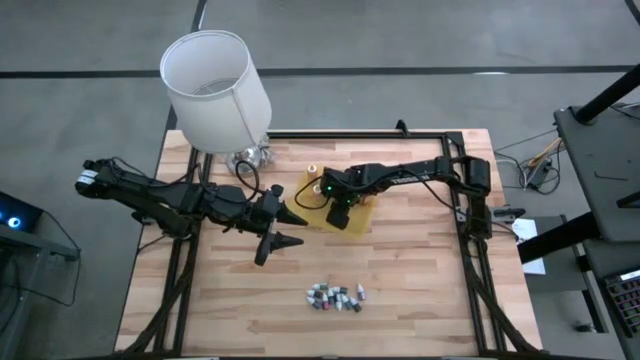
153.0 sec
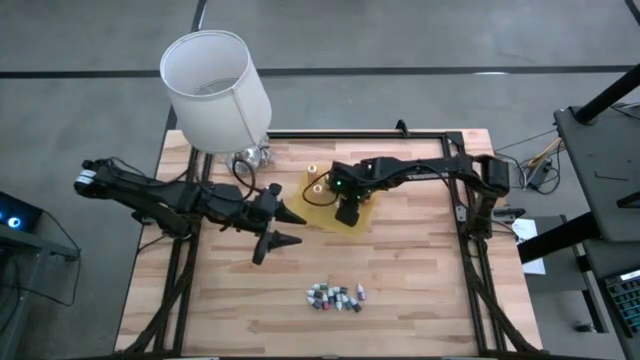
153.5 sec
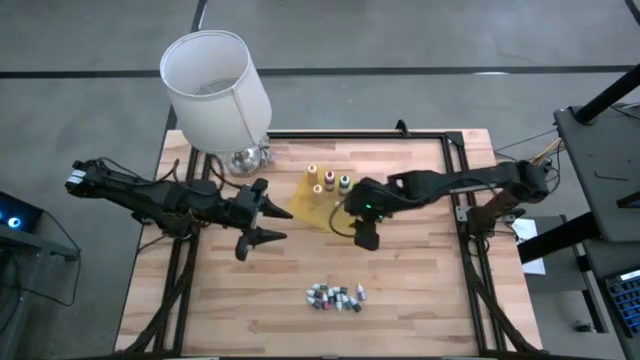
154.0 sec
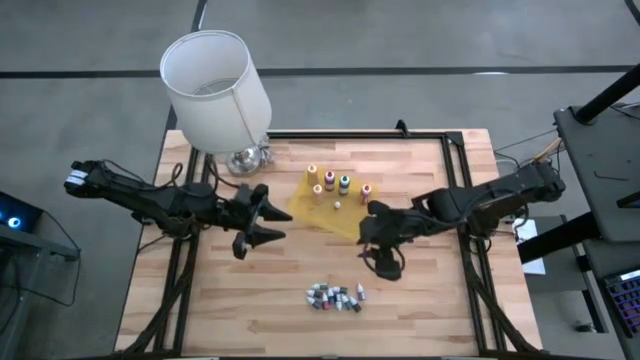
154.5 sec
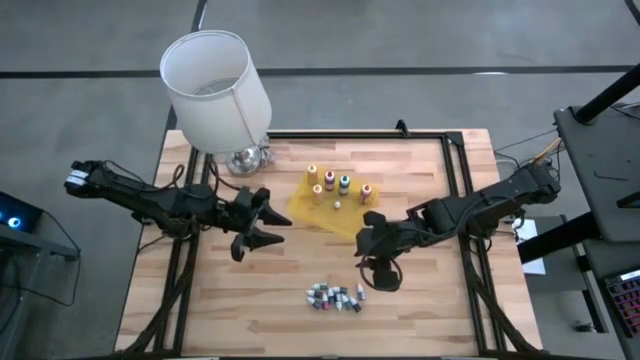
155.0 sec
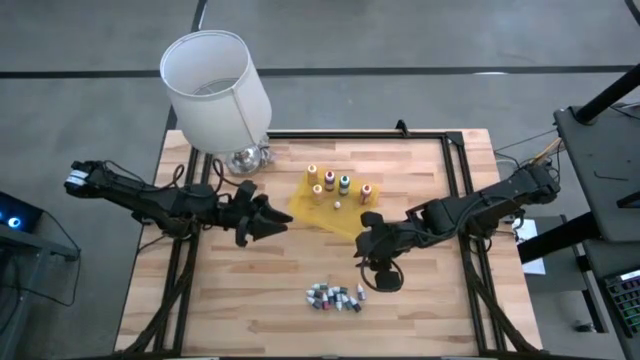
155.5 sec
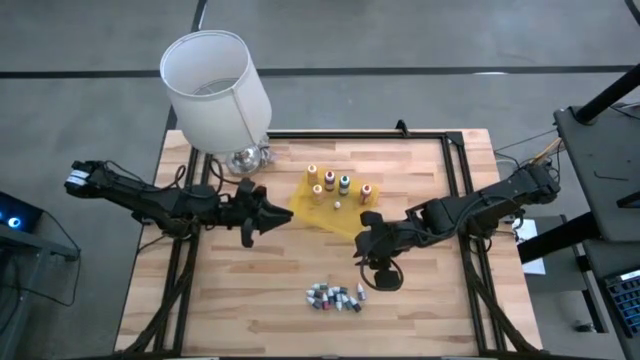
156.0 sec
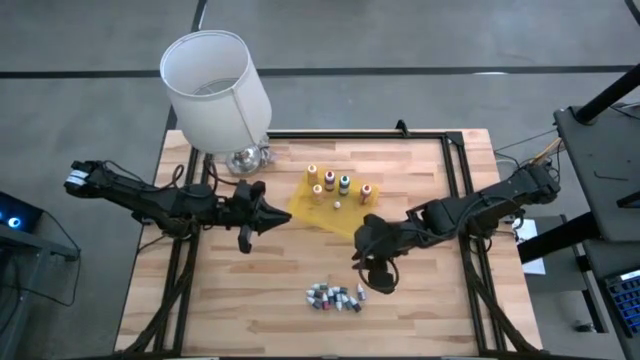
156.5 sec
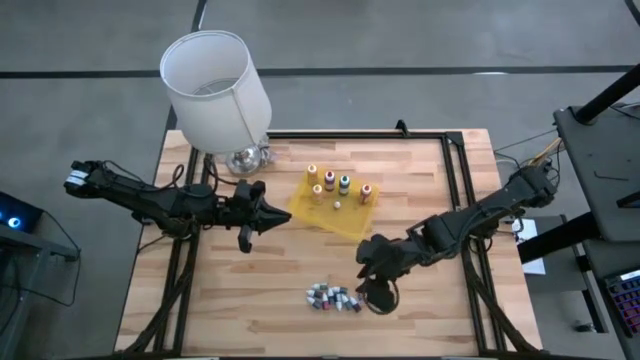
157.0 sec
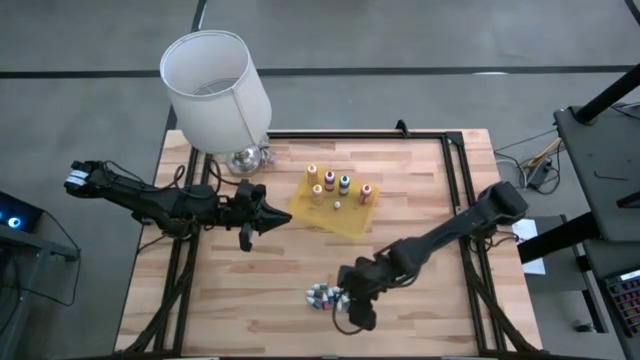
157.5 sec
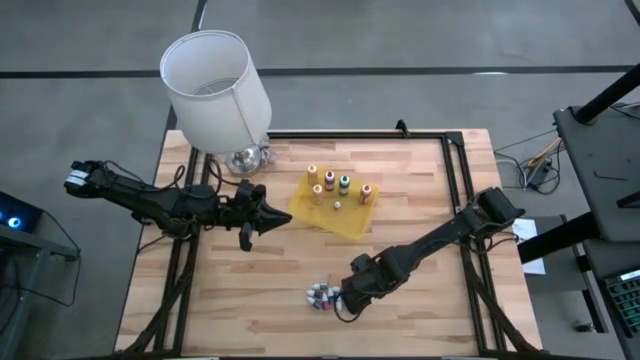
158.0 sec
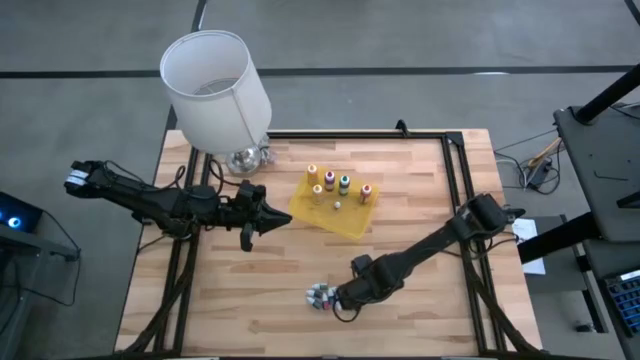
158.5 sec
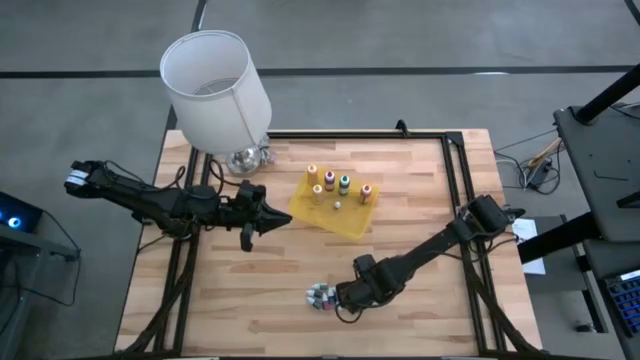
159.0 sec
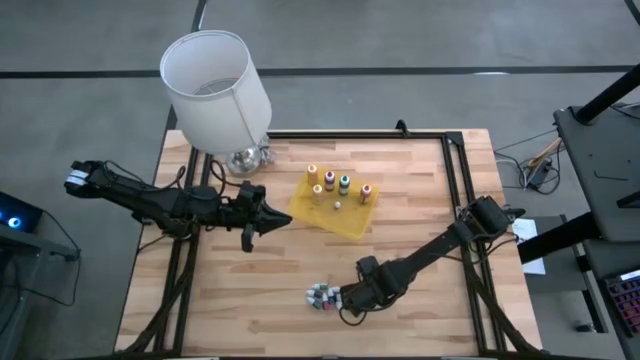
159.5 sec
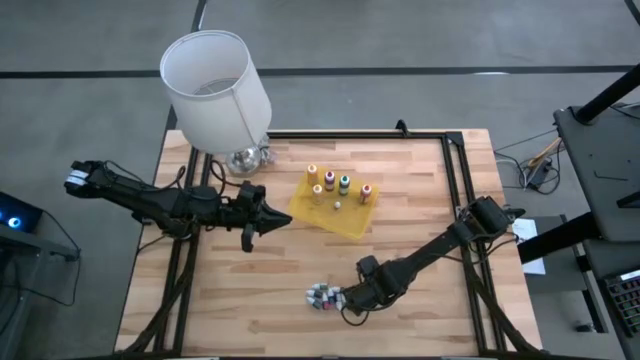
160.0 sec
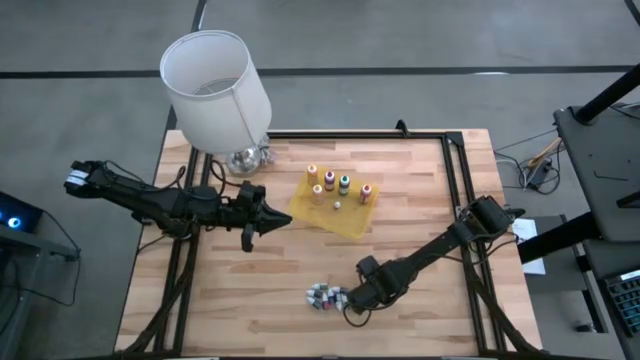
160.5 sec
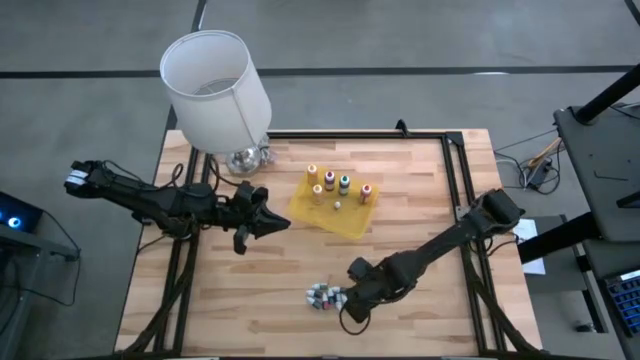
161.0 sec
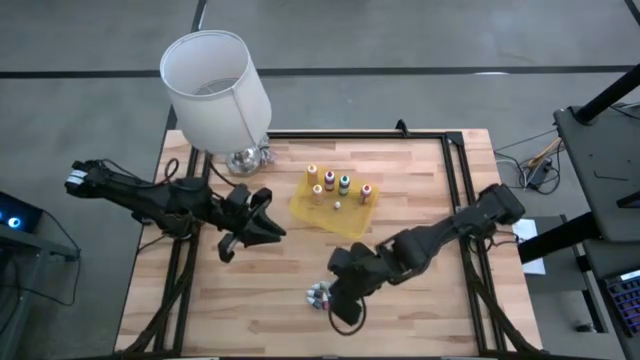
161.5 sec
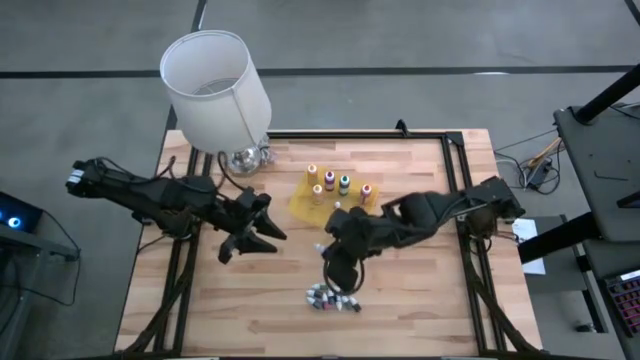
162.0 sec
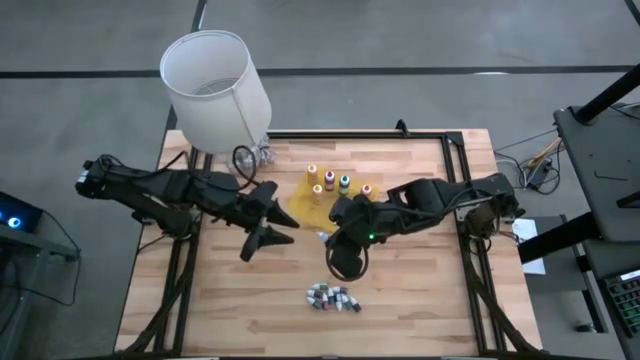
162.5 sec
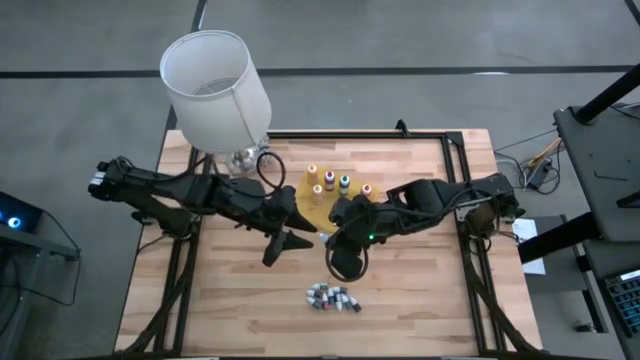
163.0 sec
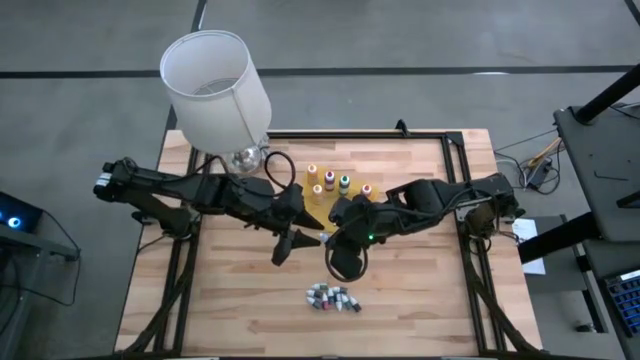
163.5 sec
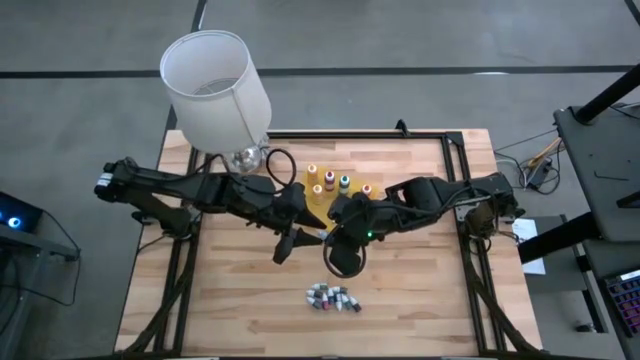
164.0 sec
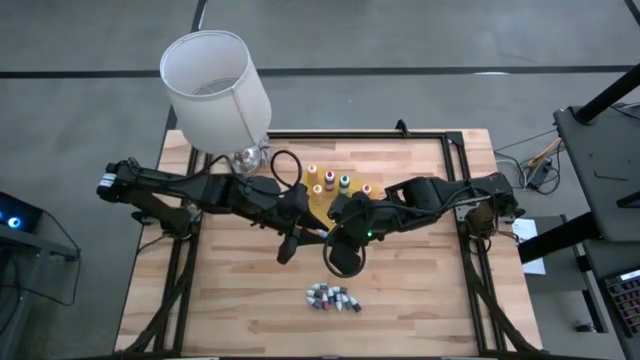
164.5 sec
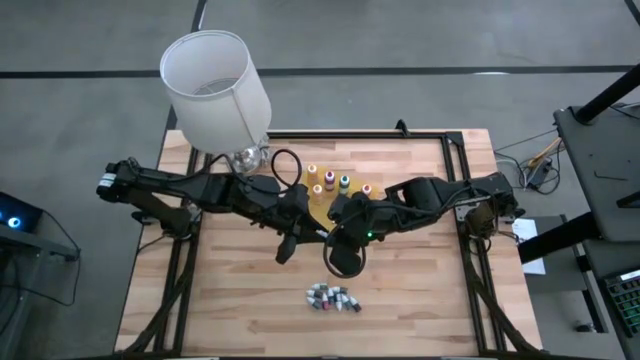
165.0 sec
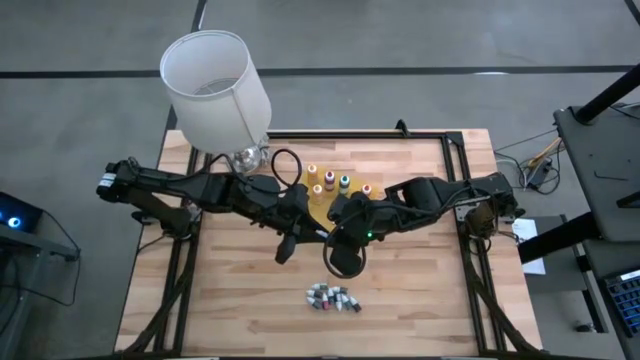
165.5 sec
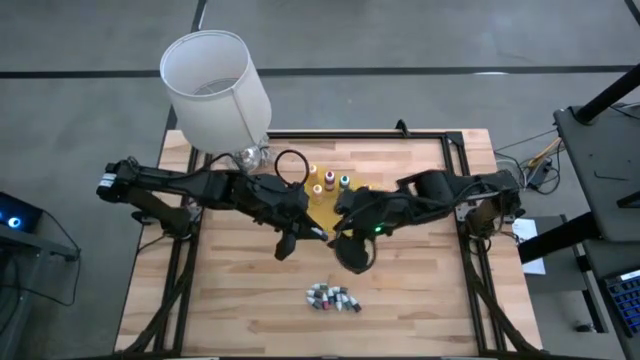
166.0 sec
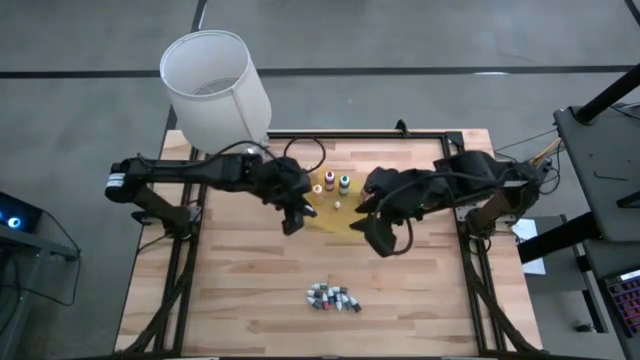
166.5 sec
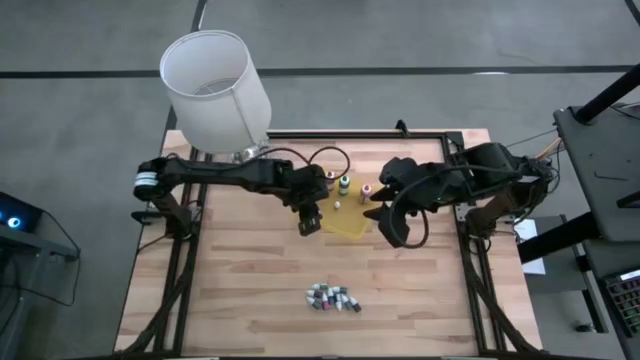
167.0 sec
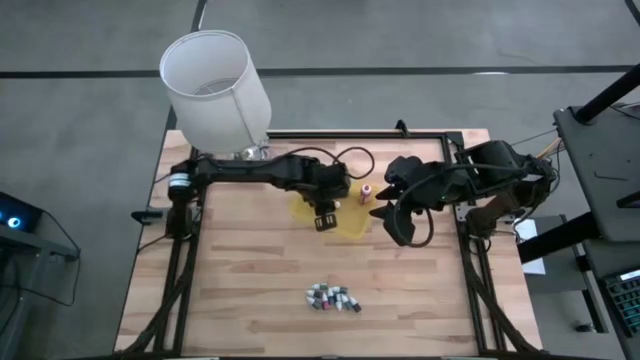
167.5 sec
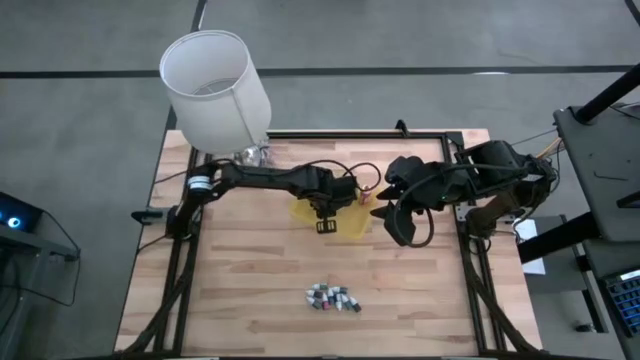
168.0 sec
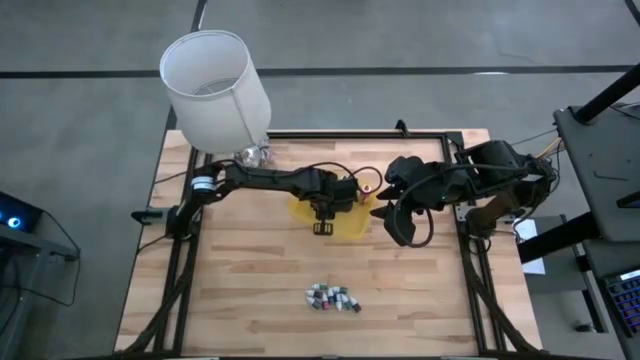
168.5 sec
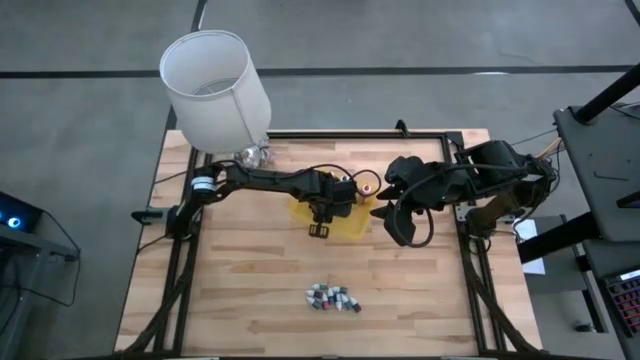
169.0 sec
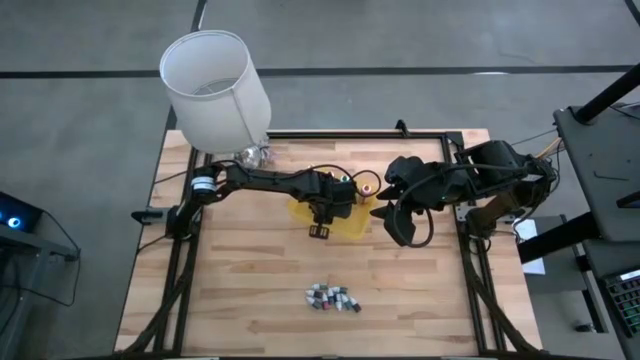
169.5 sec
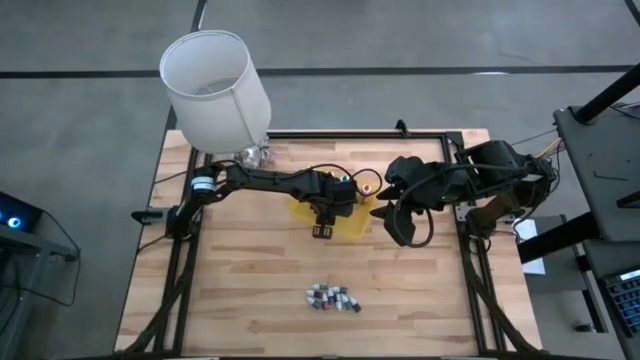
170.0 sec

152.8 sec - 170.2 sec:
Task: Pick & Place food coloring
Put the small purple food coloring bottle into the yellow bin

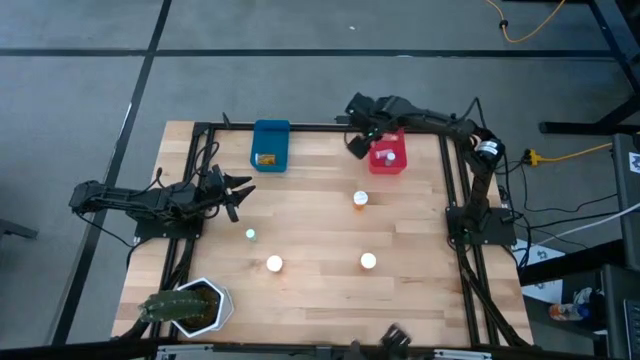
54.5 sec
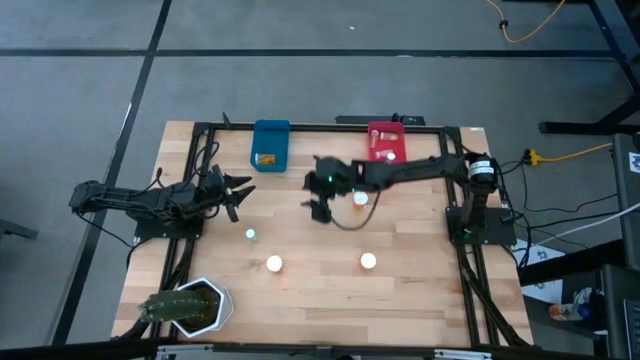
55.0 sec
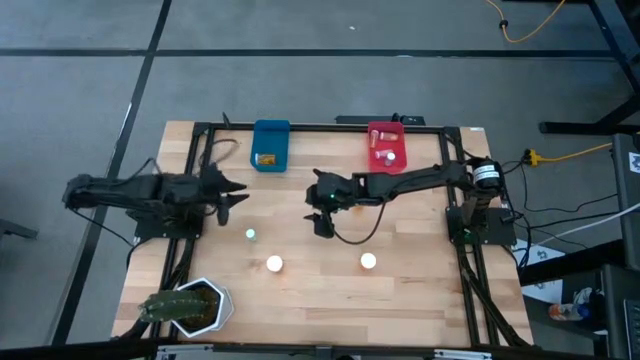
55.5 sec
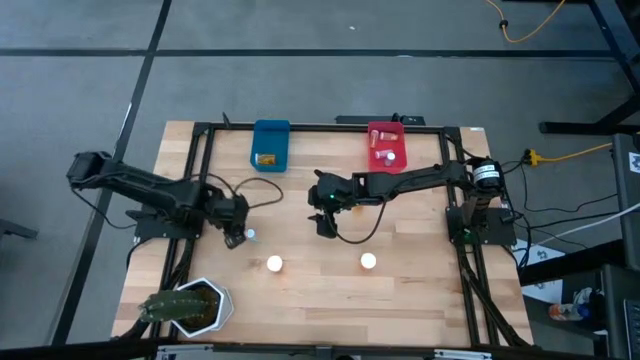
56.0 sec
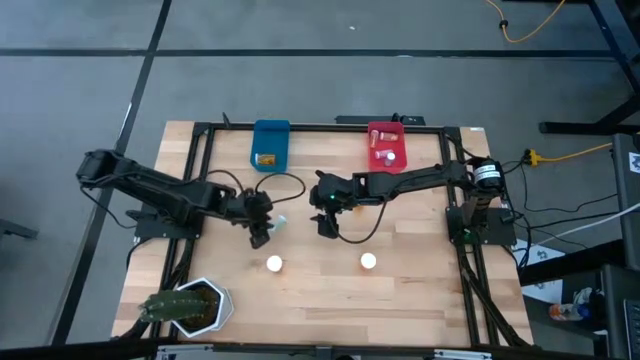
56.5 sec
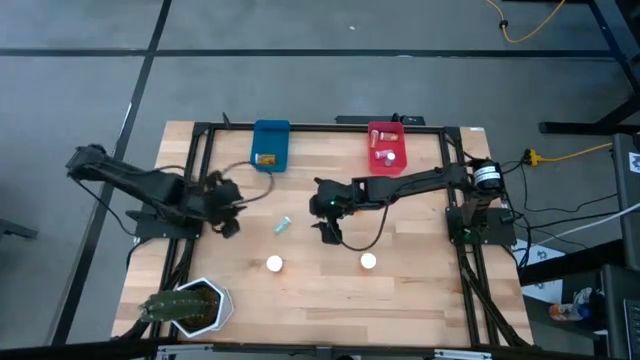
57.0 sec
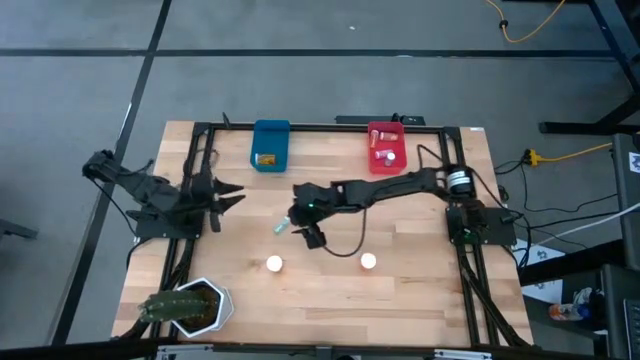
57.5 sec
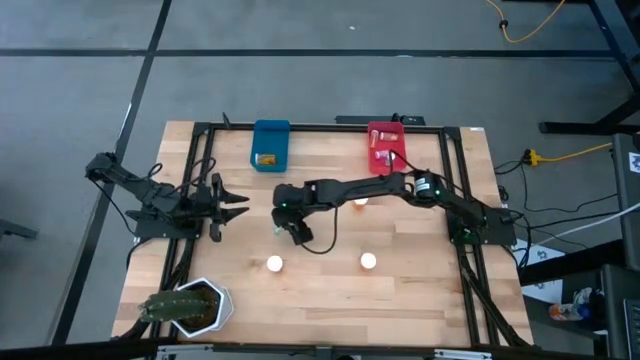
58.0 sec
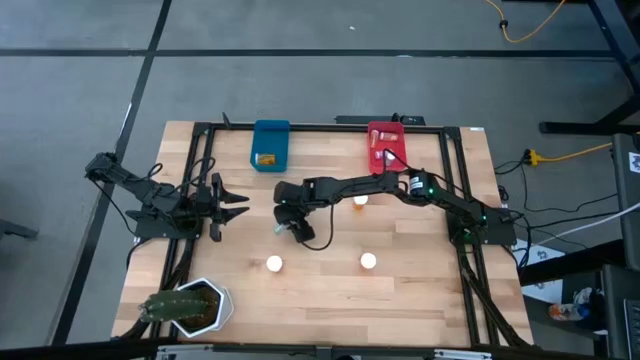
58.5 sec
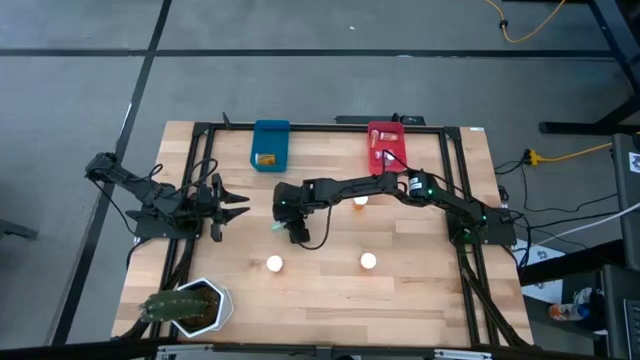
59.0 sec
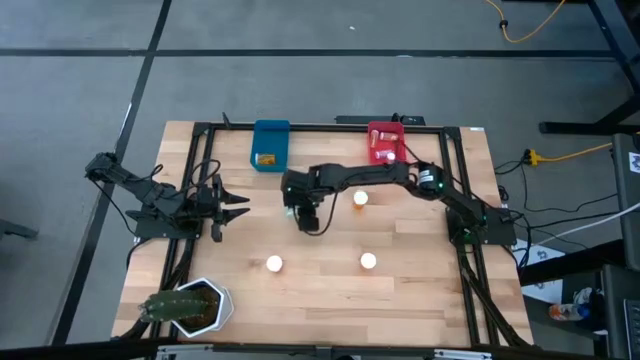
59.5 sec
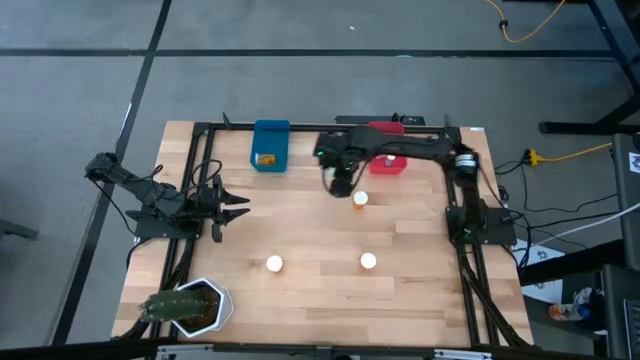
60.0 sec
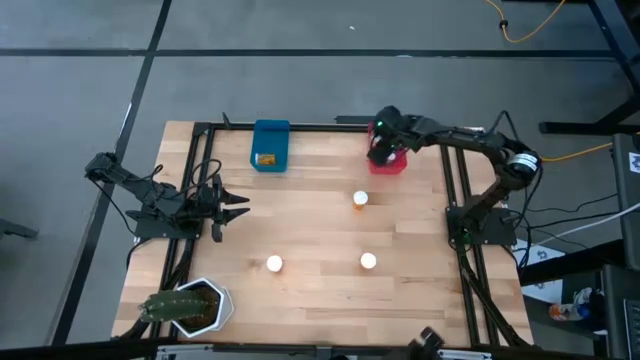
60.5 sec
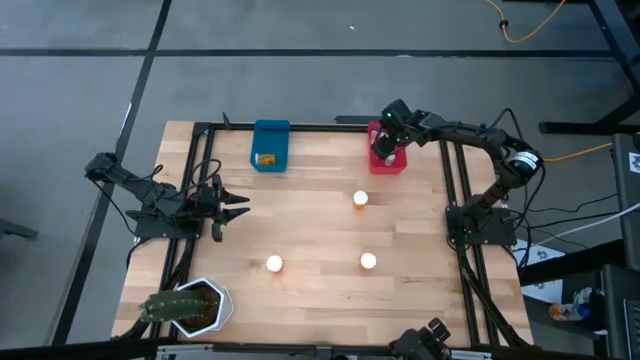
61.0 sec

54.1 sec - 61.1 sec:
Task: Pick and place medicine bottles into bin by pill shape (circle, oval)
Put the small blue pill bottle into the red bin
